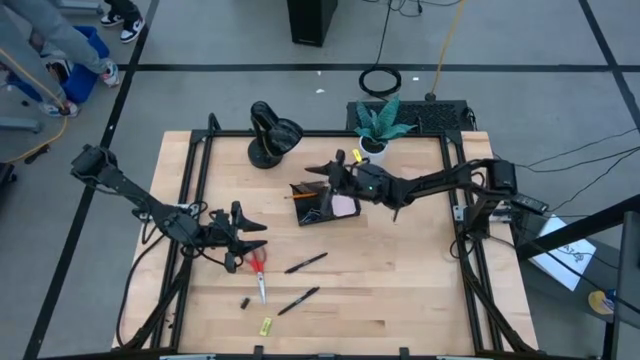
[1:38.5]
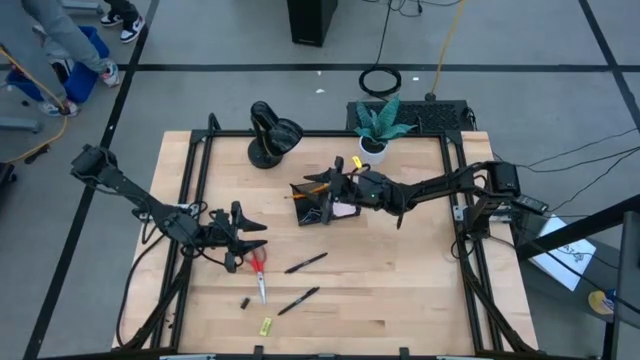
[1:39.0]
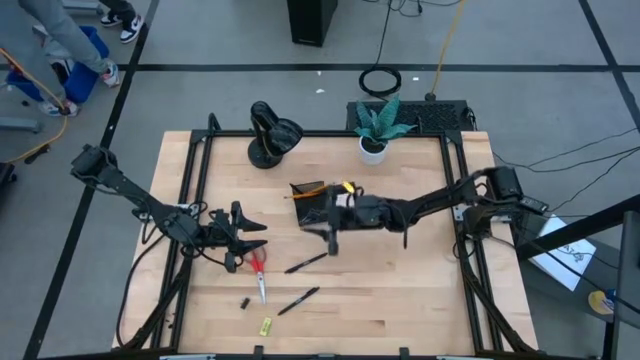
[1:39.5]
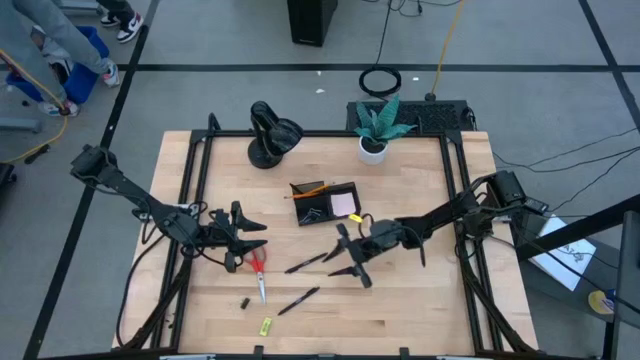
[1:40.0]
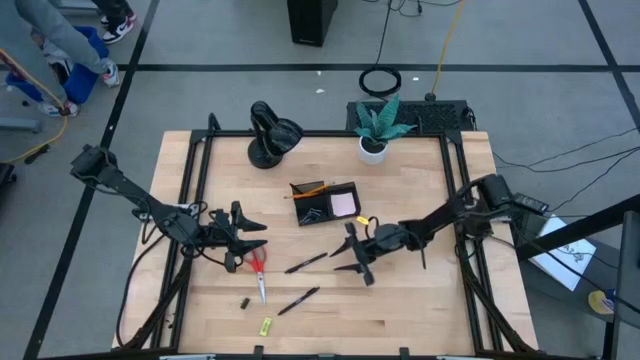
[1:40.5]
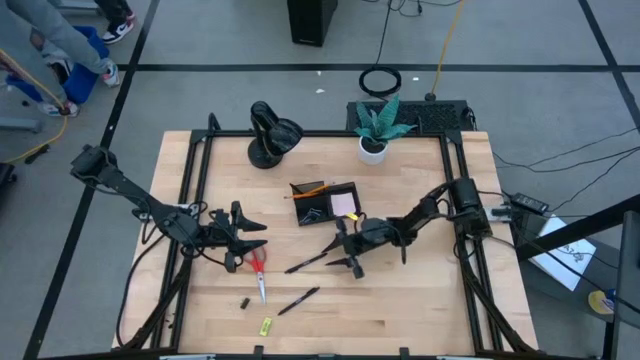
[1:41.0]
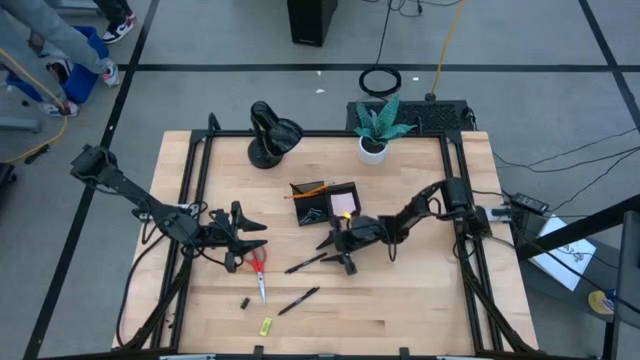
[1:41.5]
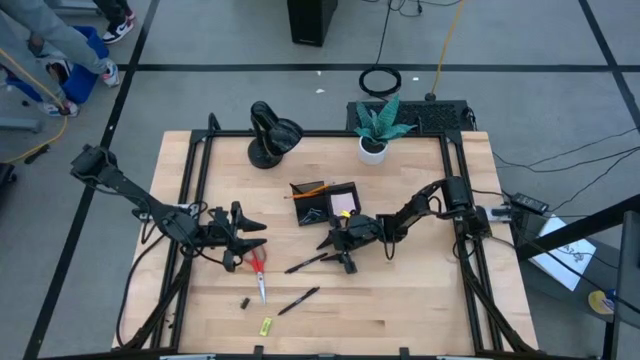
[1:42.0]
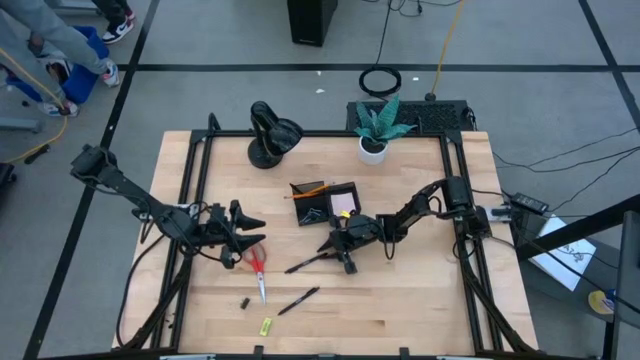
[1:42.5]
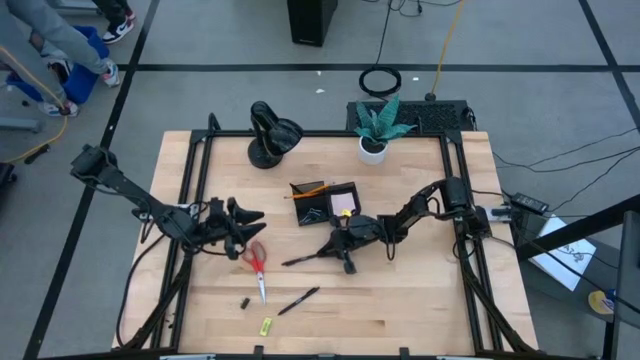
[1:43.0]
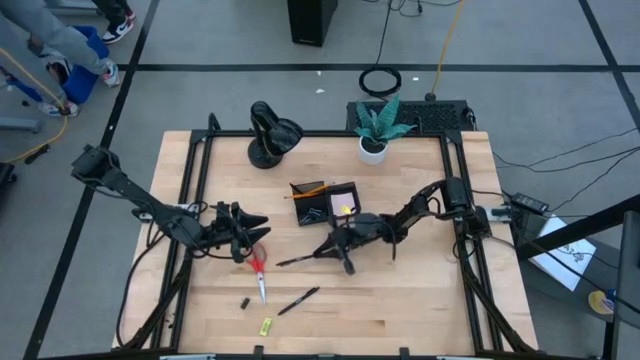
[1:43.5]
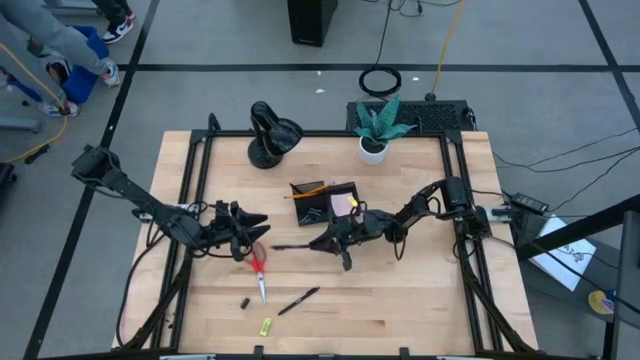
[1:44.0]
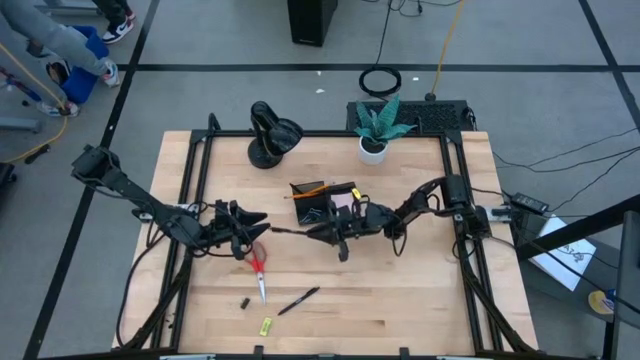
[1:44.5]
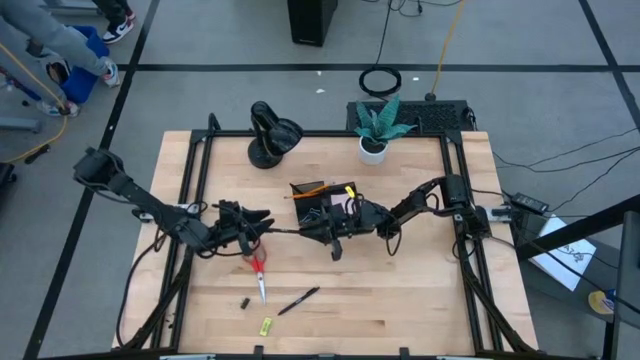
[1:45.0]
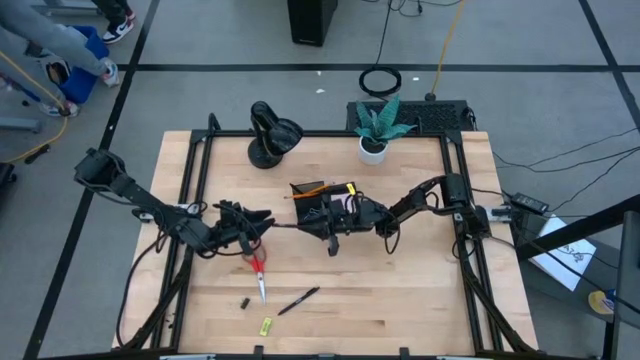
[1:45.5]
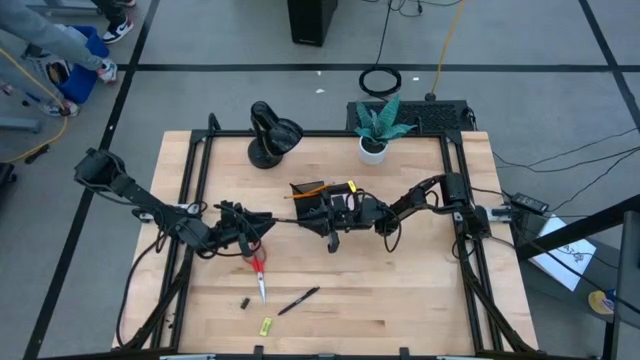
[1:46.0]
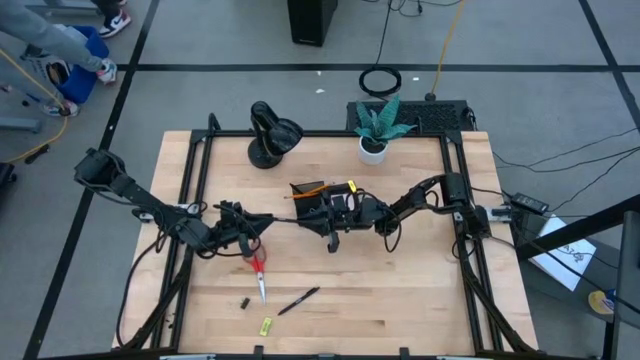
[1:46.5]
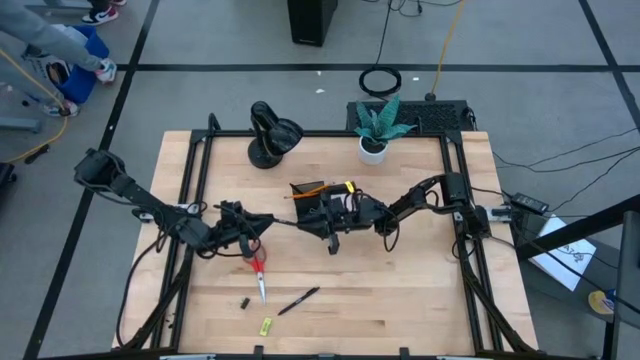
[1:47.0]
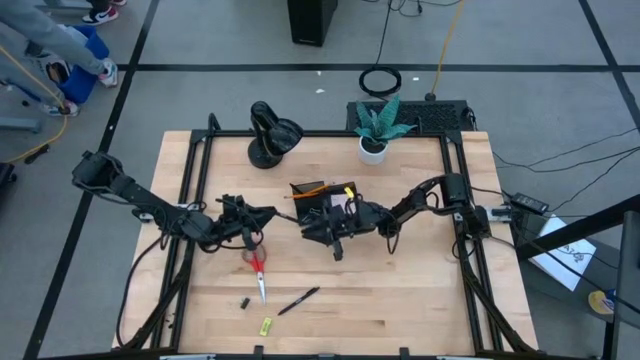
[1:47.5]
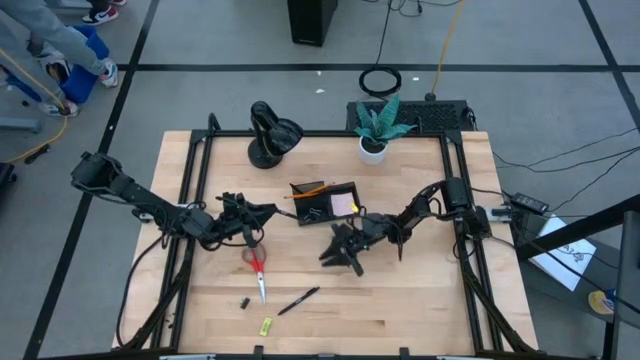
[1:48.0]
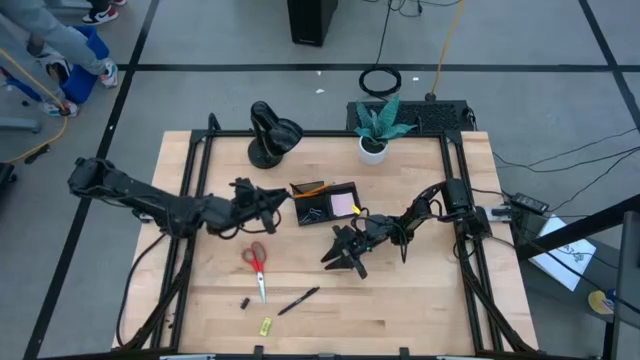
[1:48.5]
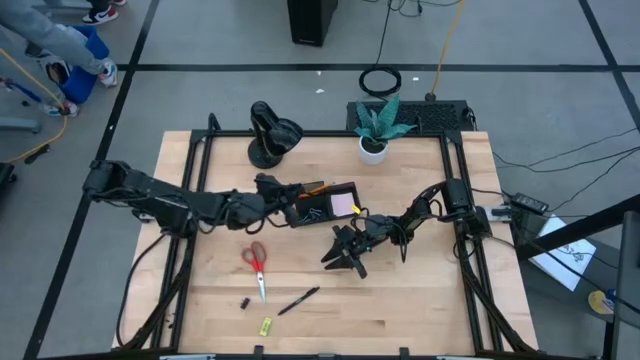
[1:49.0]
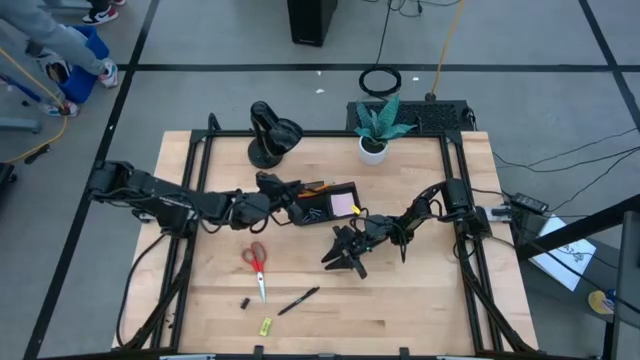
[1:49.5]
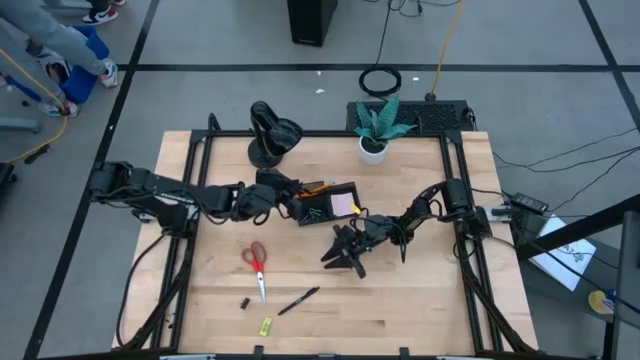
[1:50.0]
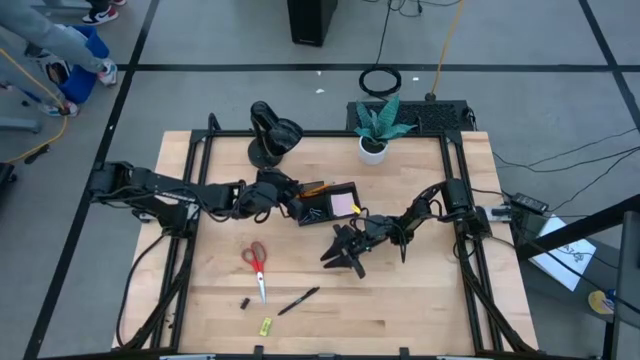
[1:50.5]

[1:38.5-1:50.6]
Task: Pick and place office supplies into organizer
Put the black pen into the desk organizer

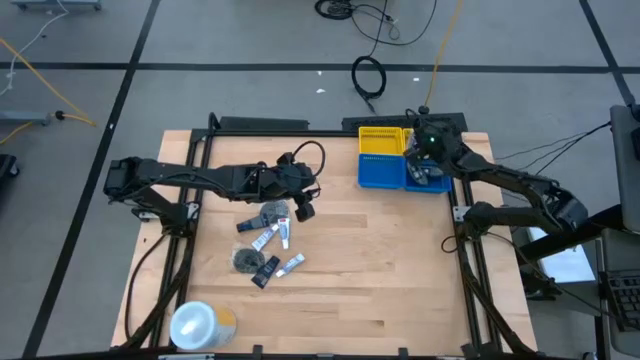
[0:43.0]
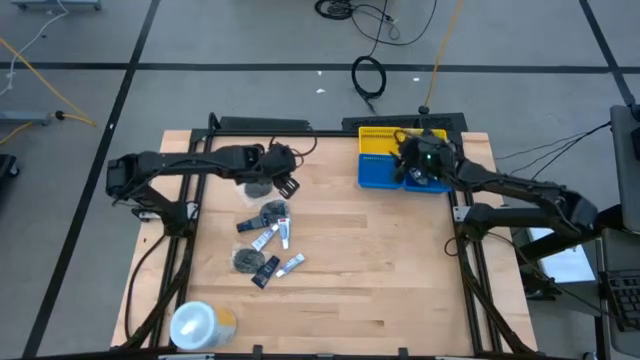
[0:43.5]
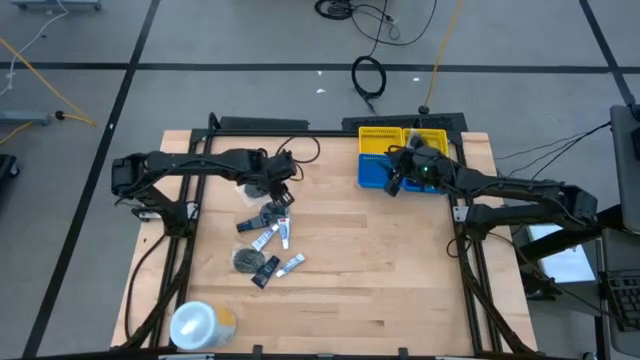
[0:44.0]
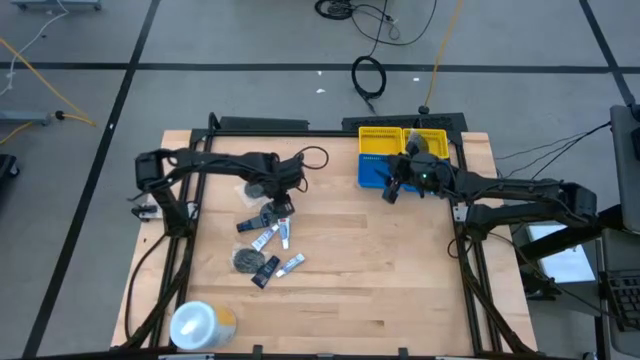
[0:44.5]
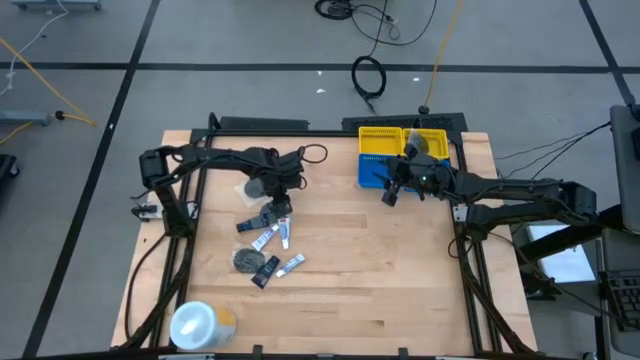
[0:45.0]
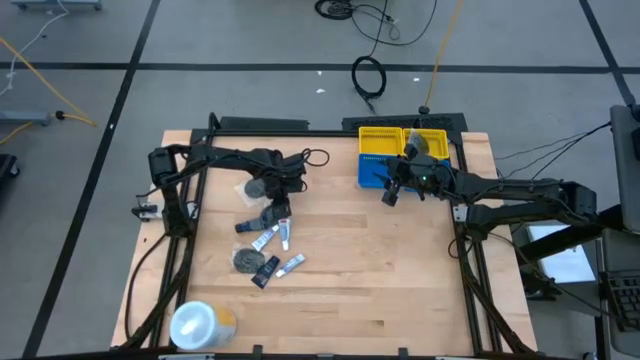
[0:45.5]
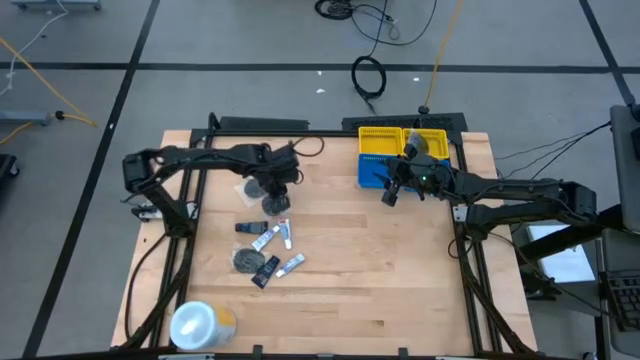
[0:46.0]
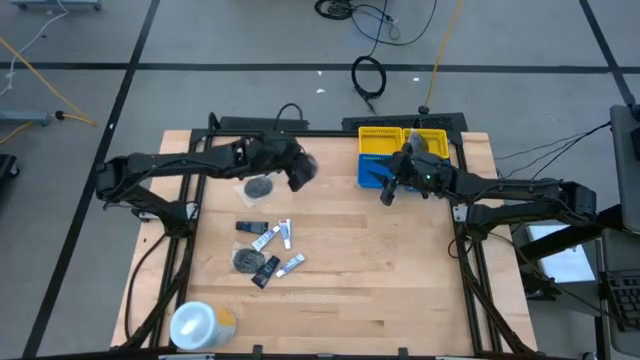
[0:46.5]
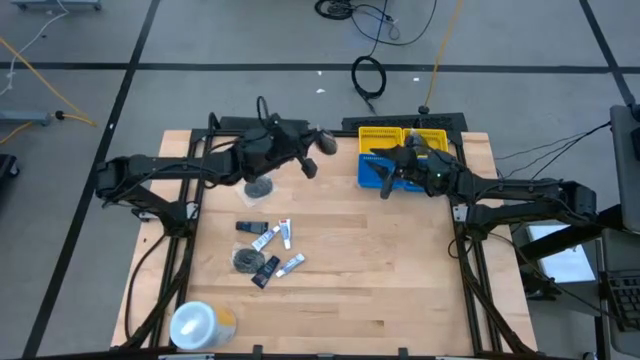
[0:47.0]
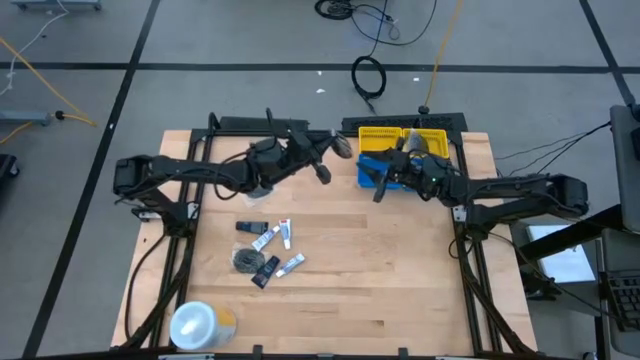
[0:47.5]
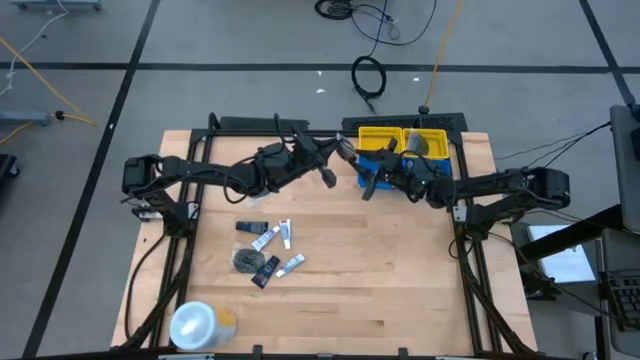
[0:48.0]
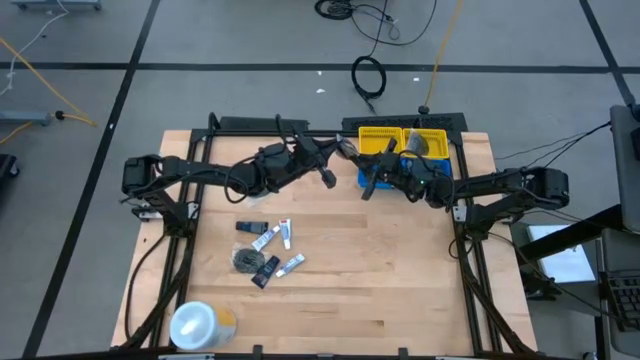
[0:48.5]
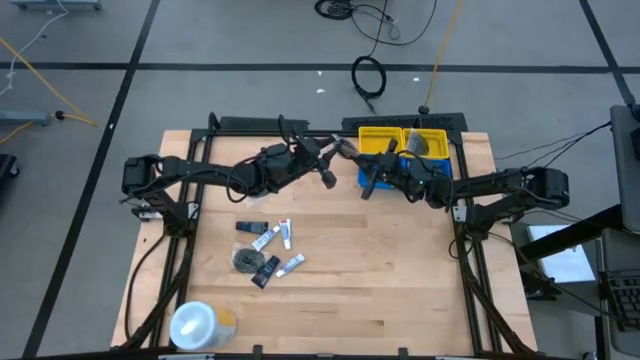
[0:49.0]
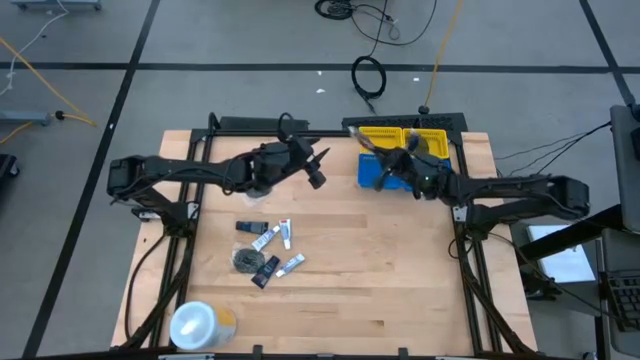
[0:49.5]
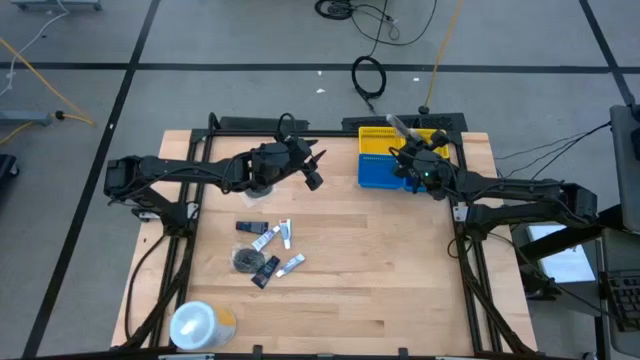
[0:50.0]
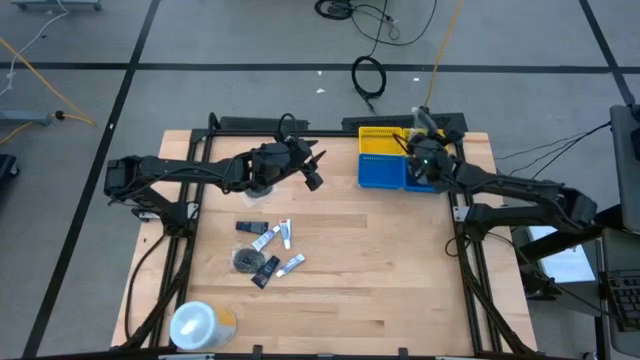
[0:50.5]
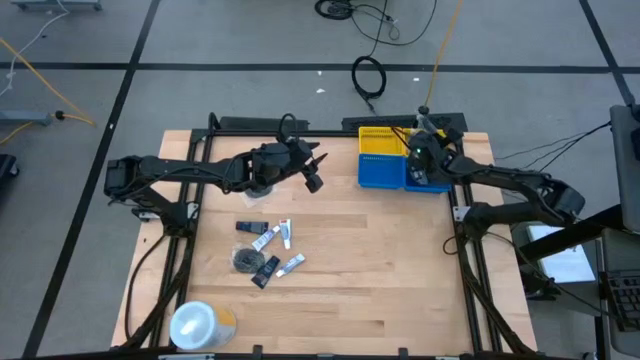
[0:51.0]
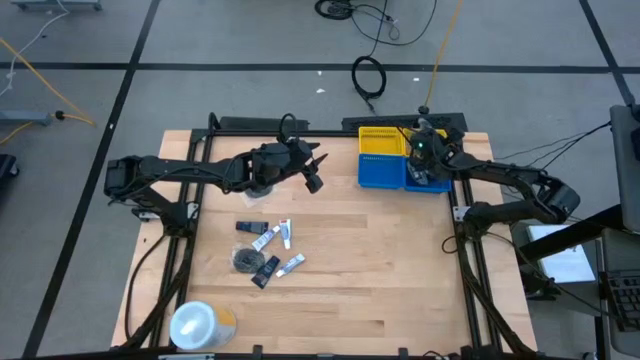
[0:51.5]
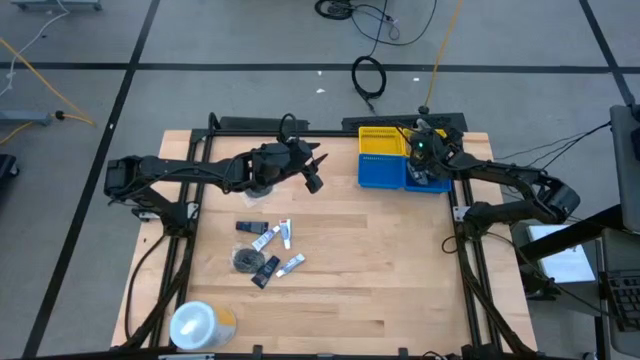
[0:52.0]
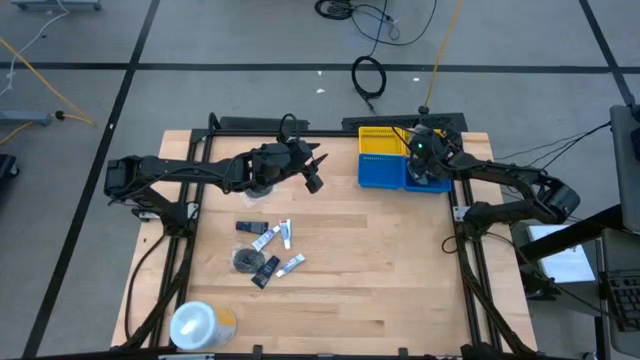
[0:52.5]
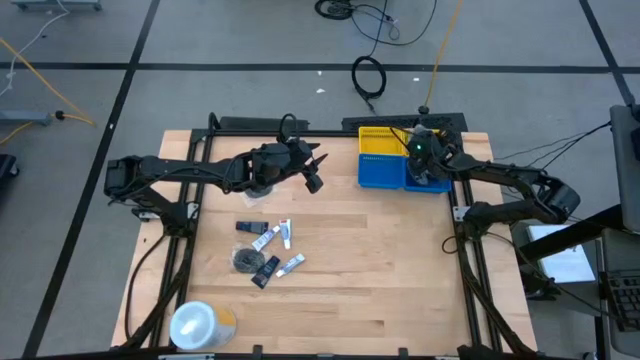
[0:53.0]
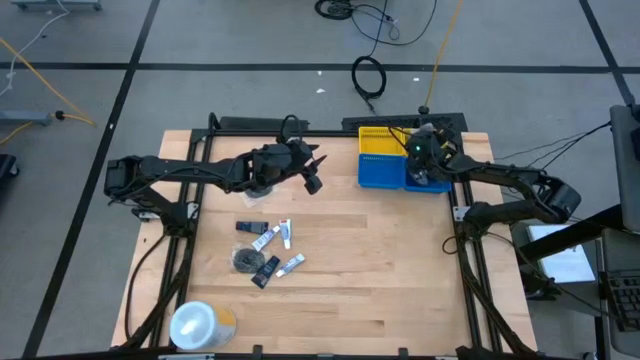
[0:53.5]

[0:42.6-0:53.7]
Task: Pick & Place Travel size toiletries
Put the black hairbrush into the right yellow basket
